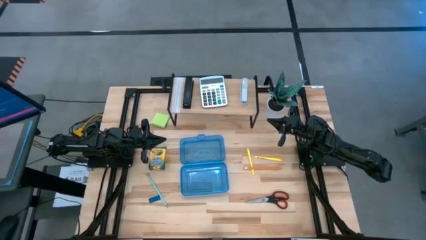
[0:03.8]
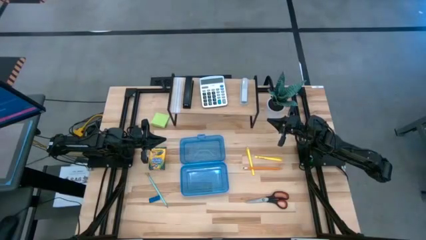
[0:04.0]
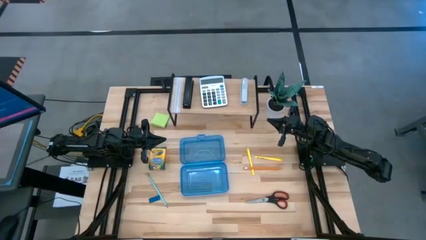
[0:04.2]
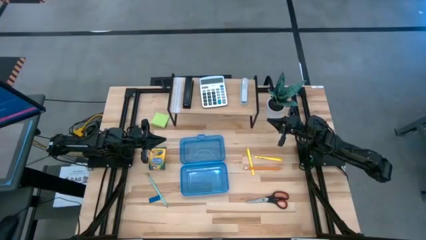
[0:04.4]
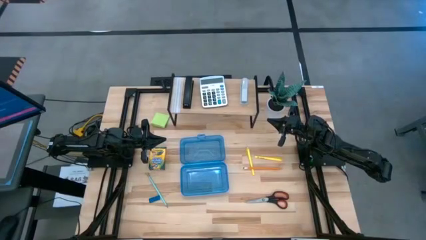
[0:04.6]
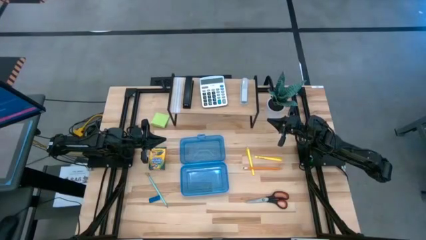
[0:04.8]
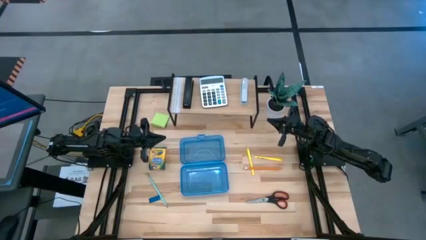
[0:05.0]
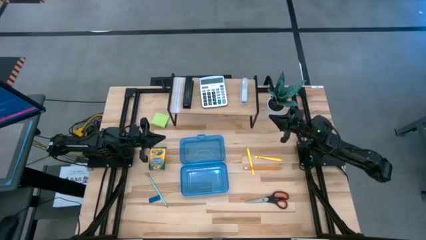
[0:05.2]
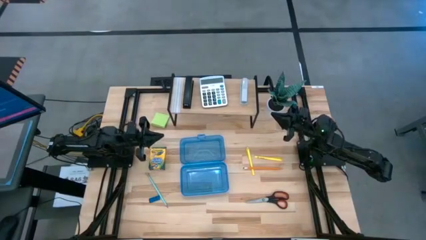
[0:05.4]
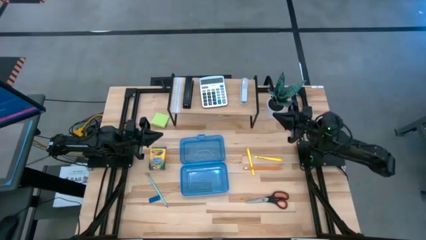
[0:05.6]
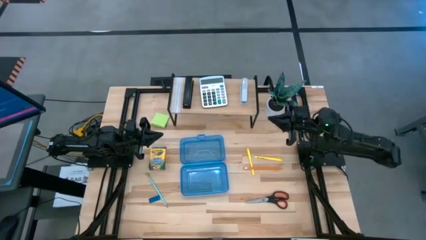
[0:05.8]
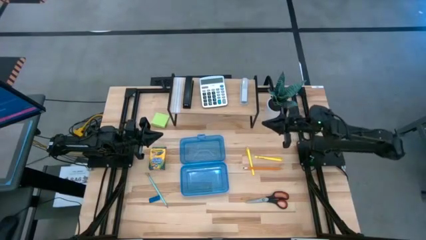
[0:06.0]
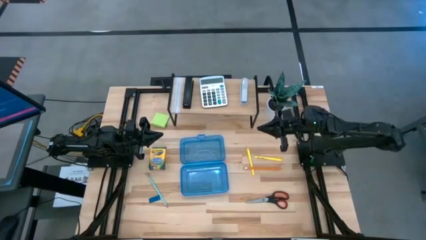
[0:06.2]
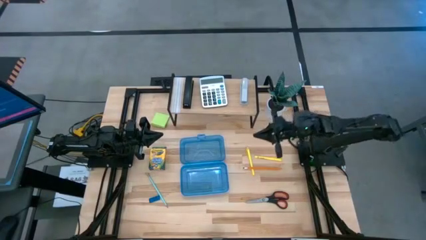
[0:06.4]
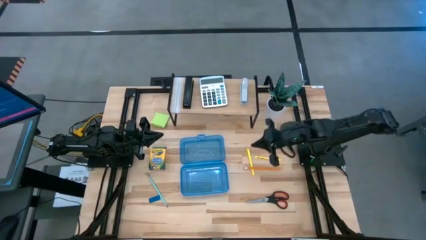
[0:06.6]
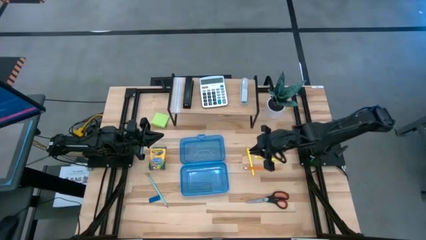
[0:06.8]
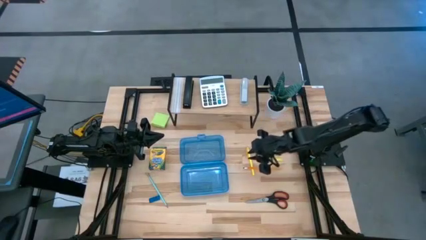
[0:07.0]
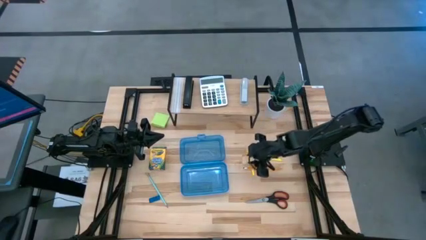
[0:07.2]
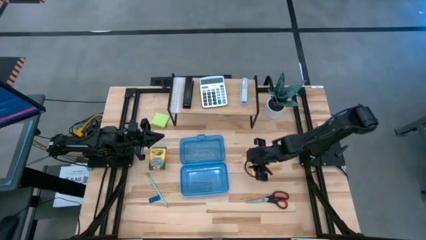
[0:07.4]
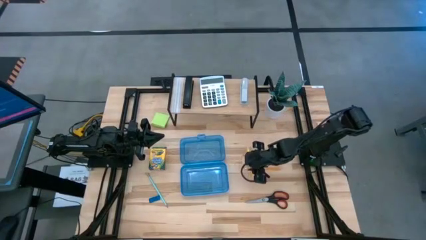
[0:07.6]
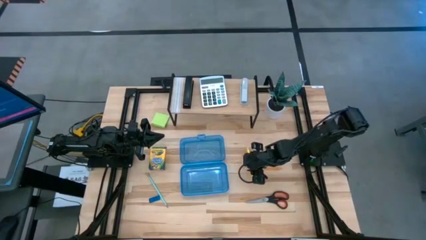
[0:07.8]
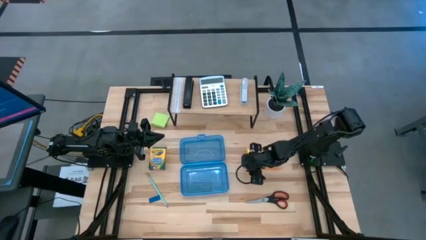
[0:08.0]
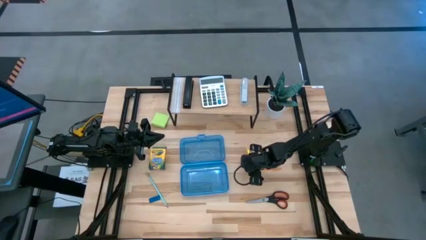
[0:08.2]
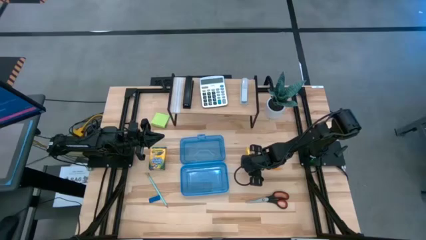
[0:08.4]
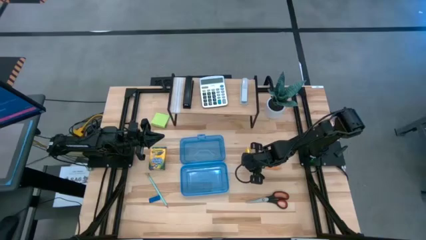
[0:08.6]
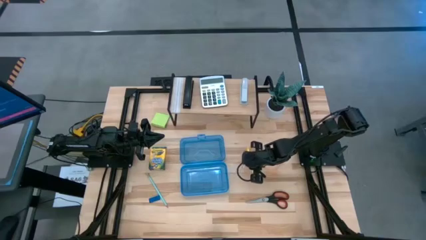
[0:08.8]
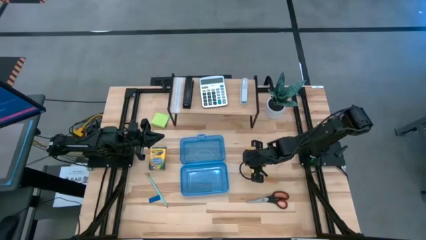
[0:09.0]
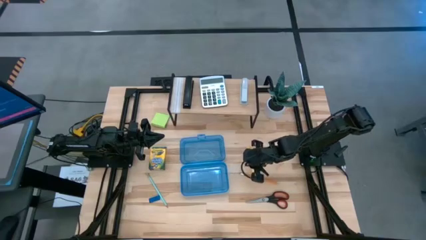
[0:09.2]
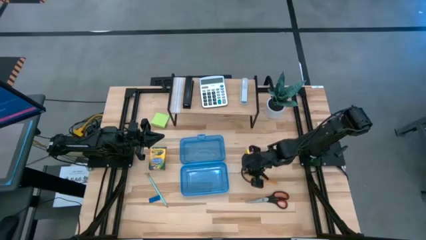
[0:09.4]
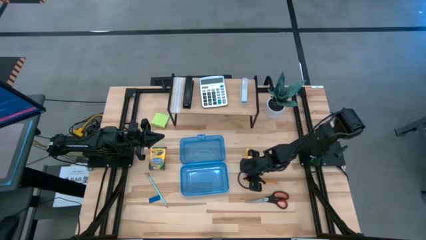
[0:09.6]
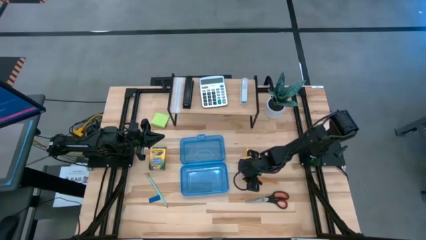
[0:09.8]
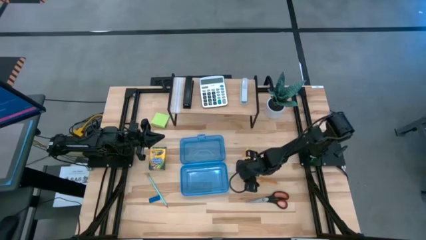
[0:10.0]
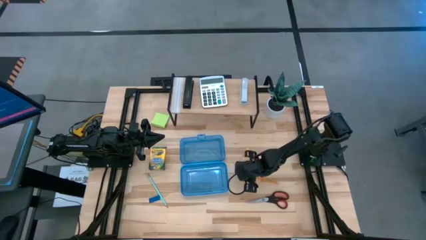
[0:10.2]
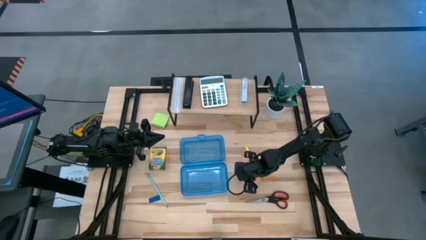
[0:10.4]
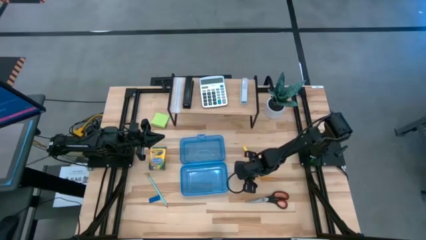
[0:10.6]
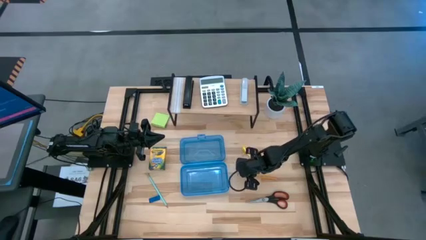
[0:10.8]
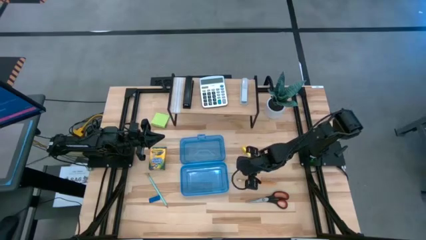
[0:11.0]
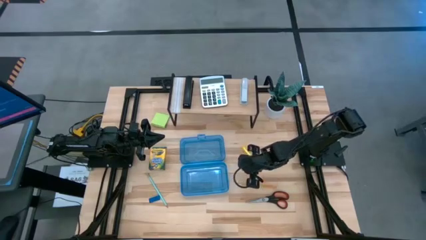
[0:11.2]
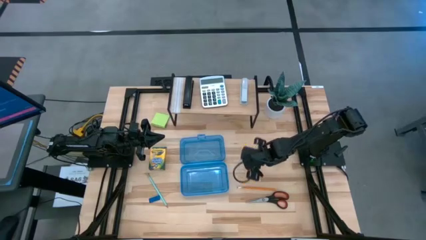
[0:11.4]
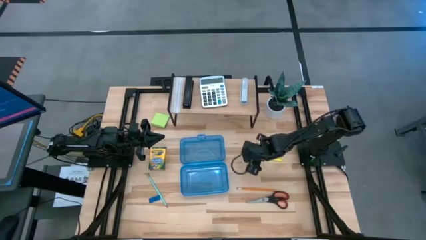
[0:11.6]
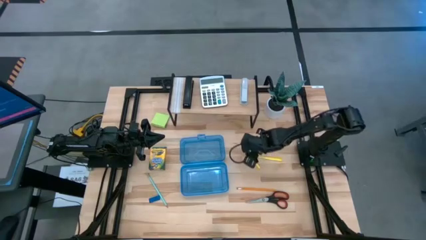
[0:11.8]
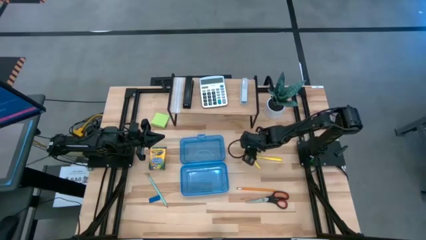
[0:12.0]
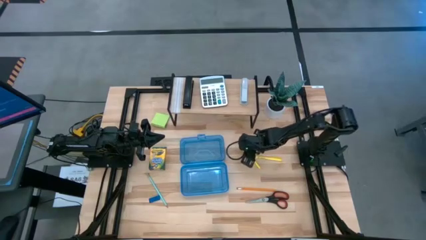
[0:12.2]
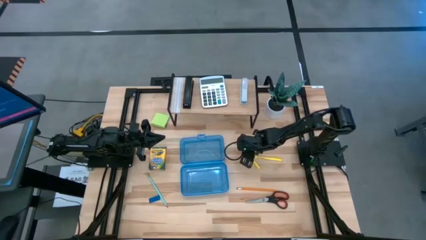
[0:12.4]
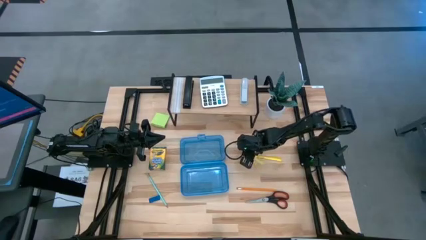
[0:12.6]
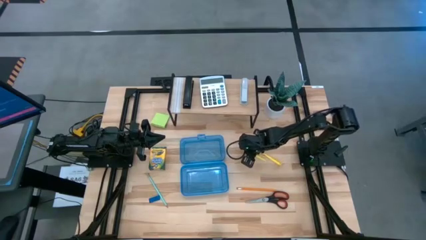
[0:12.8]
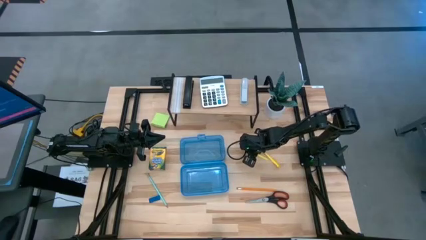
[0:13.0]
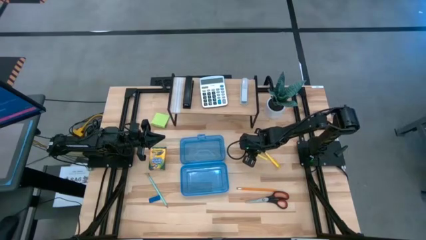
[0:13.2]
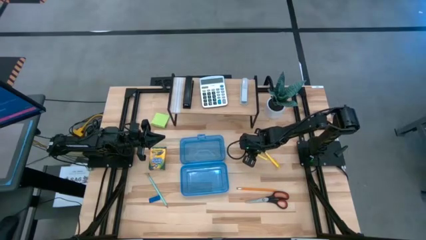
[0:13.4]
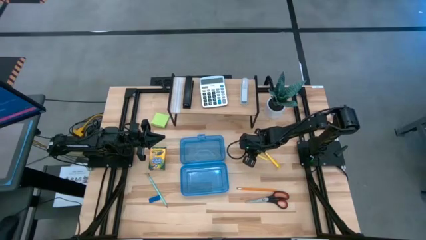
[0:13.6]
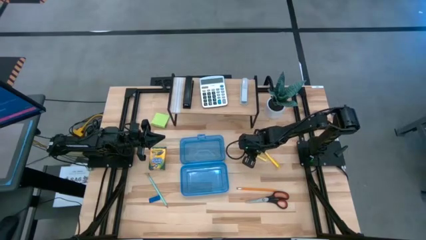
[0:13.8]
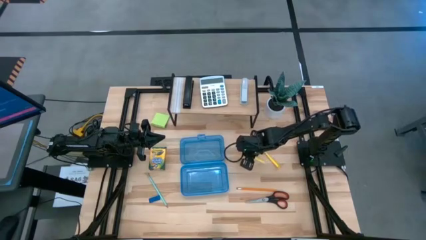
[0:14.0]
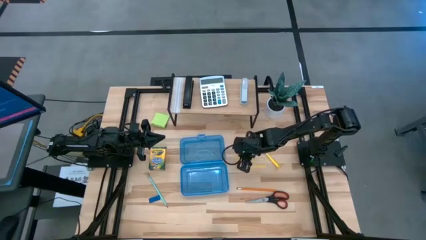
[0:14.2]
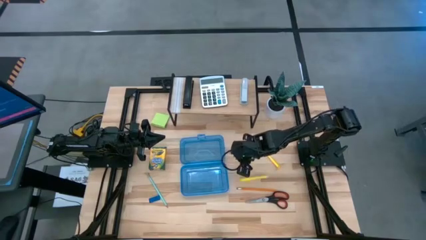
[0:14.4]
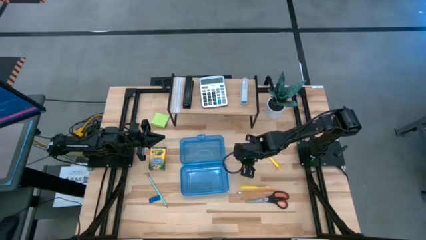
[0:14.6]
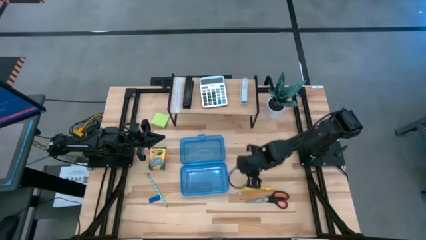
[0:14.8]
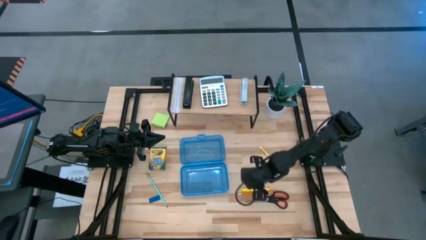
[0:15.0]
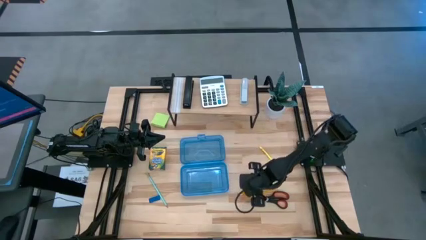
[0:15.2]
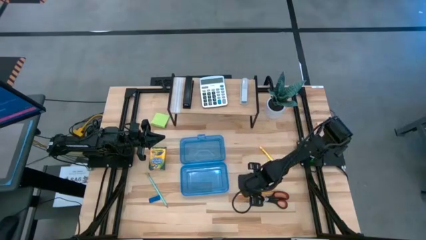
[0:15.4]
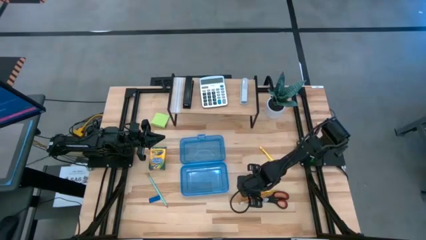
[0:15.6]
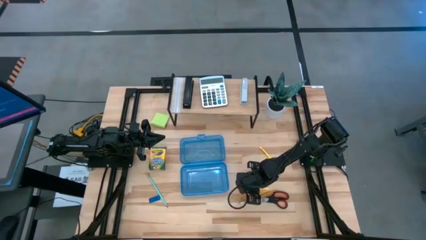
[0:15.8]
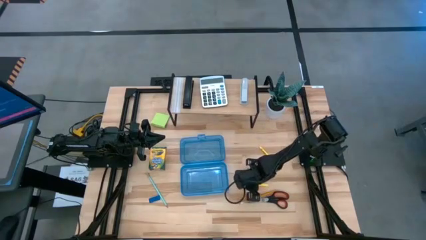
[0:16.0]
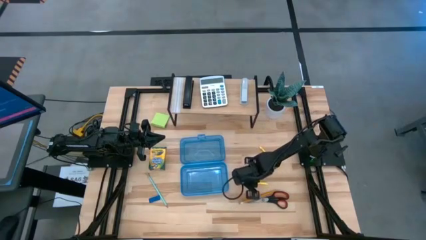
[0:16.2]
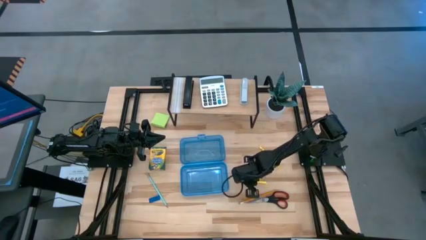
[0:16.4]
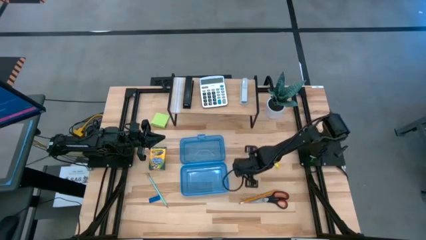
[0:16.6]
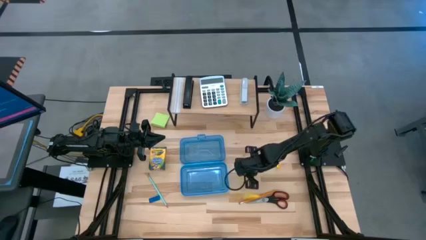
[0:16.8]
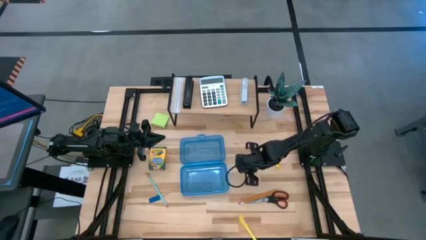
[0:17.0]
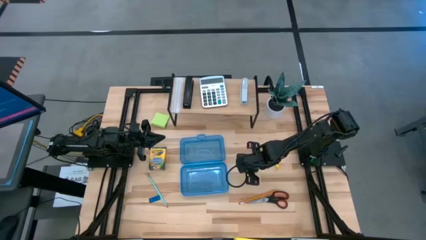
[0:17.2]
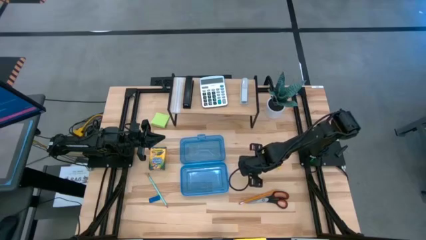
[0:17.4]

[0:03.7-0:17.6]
Task: Pack school essentials
Put the yellow pen into the blue supply box

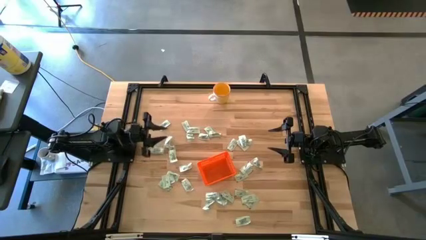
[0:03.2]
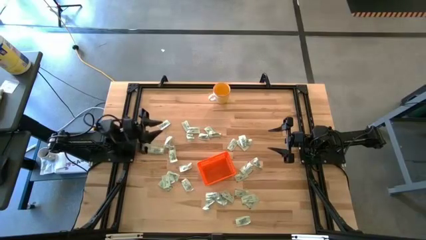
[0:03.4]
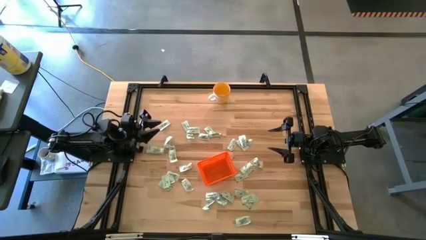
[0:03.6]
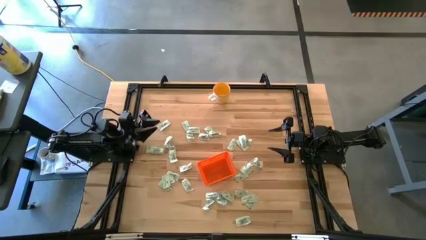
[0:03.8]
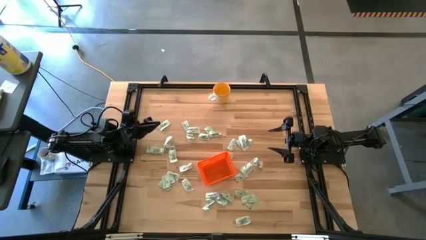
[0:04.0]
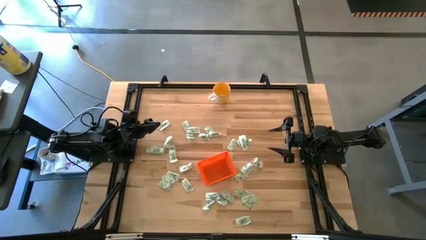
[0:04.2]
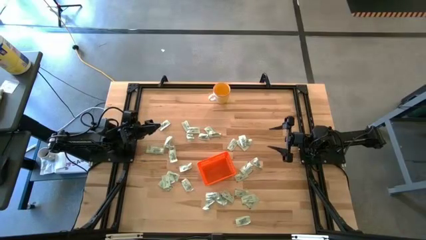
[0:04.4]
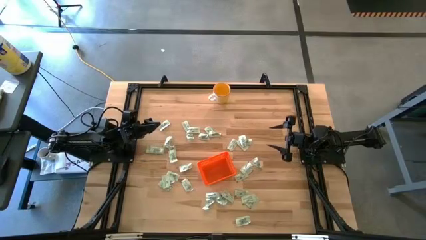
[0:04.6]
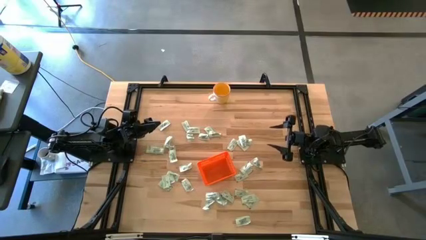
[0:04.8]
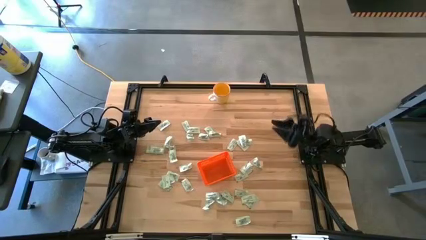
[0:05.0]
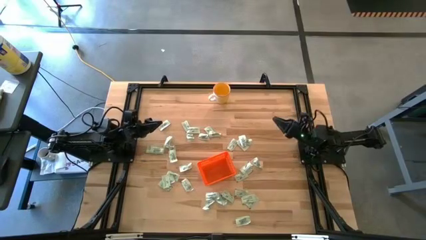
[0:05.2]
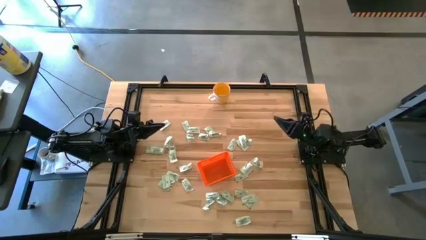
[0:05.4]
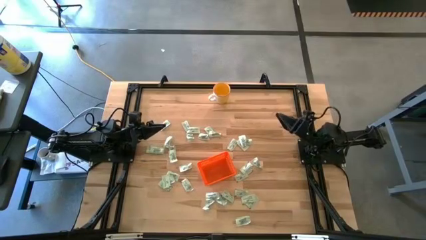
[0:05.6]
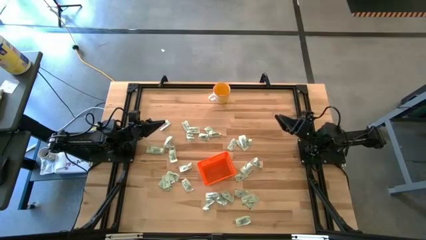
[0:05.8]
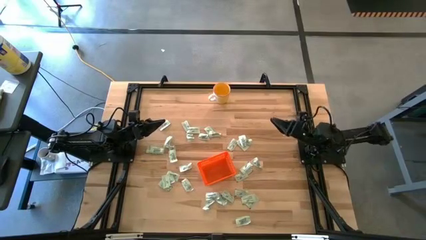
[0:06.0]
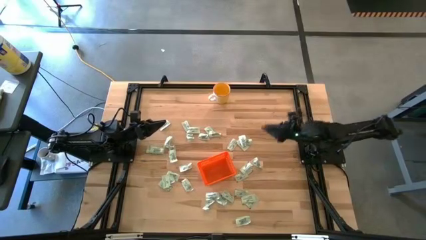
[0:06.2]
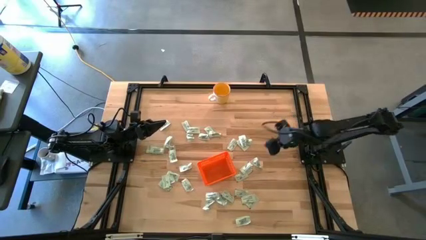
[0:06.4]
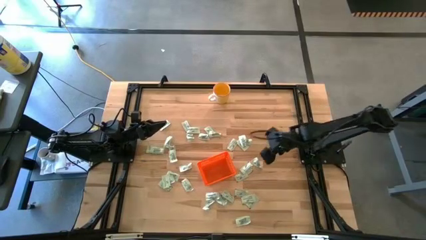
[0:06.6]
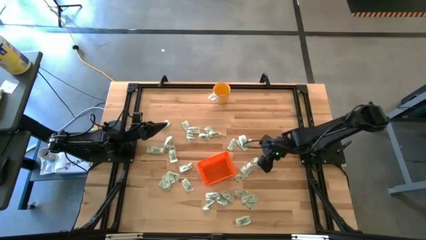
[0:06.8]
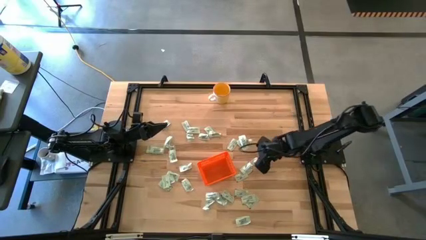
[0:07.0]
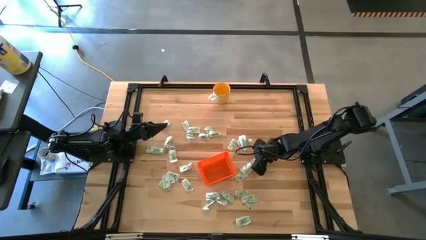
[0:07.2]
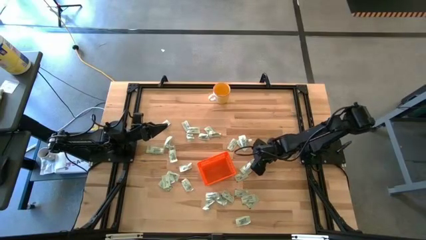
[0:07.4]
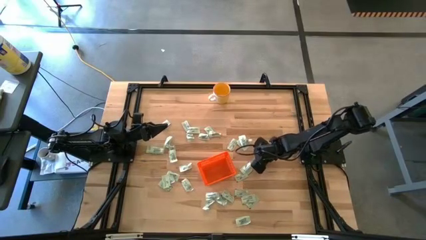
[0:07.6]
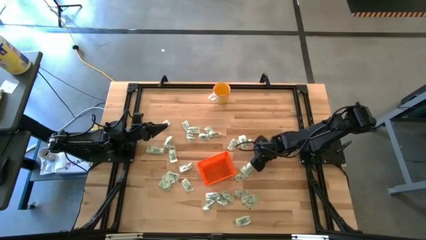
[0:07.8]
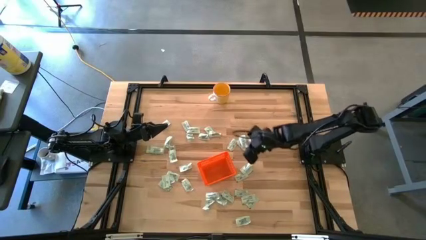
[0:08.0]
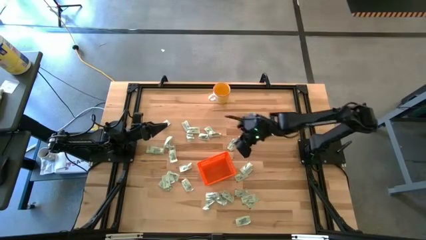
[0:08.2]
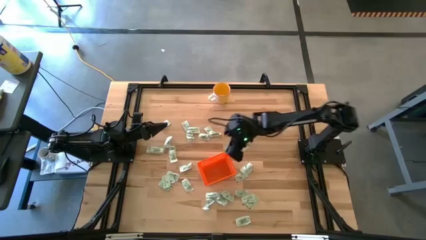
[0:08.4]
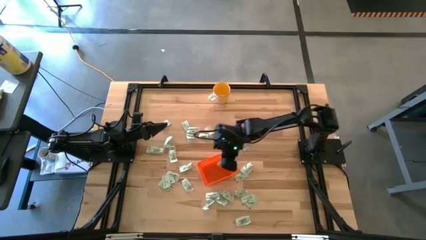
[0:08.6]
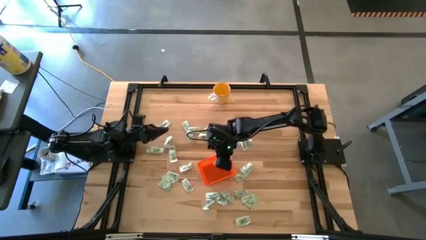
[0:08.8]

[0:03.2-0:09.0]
Task: Pick and place Stevia / Truvia into bins
Put the stevia packet into the bin
